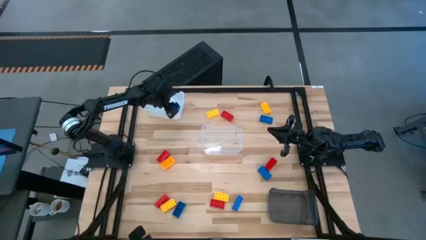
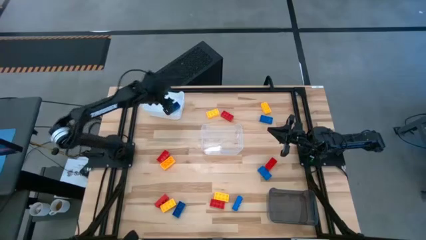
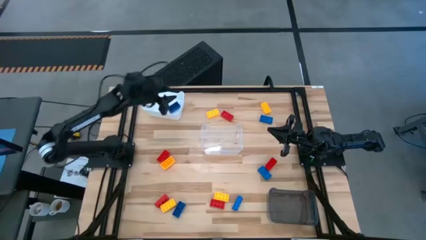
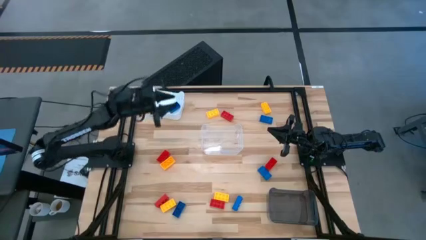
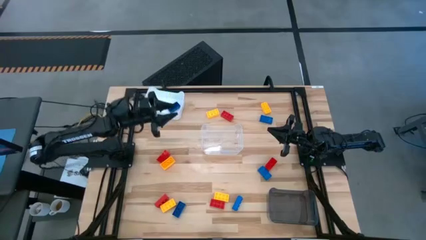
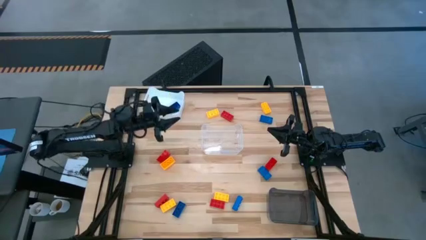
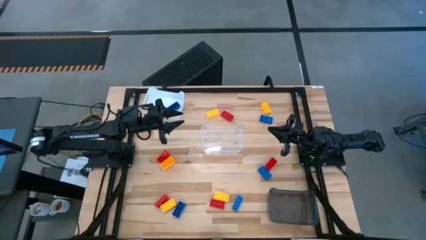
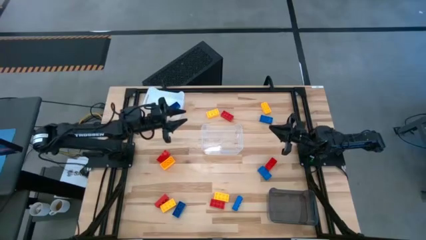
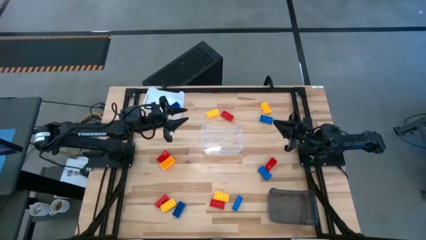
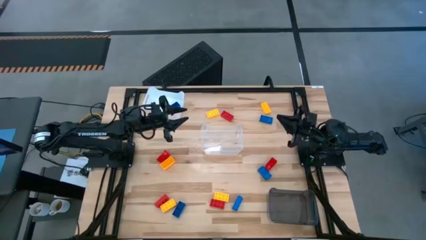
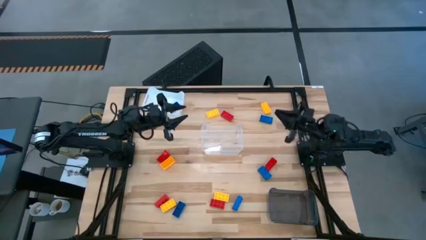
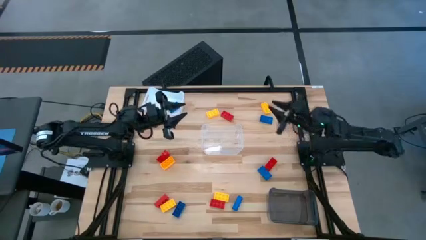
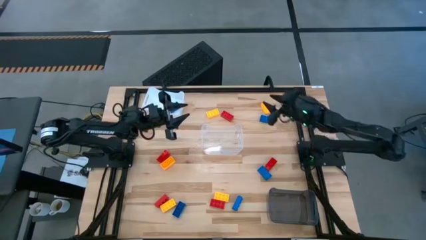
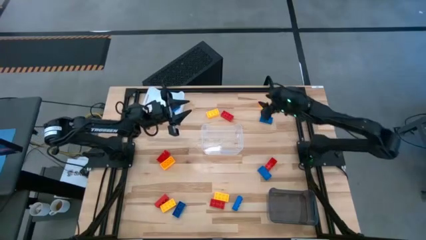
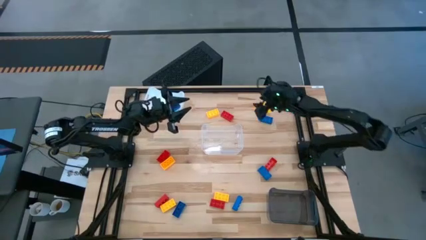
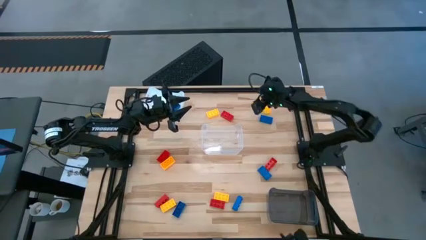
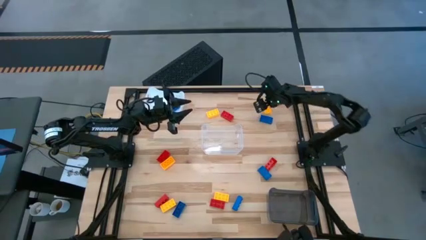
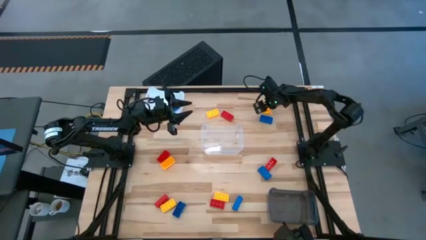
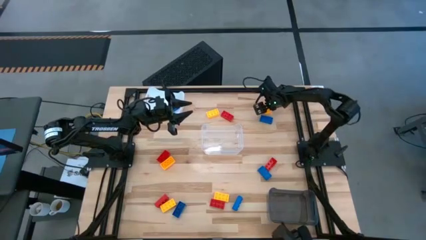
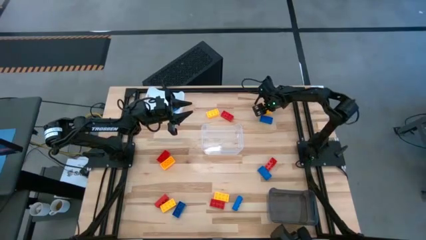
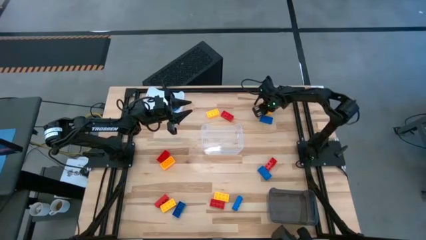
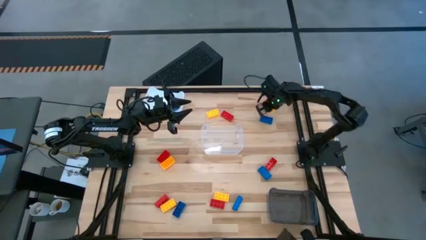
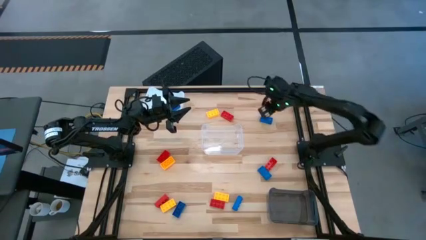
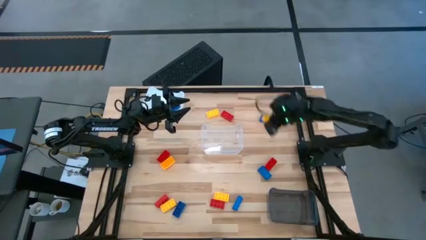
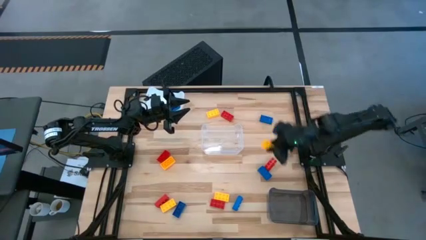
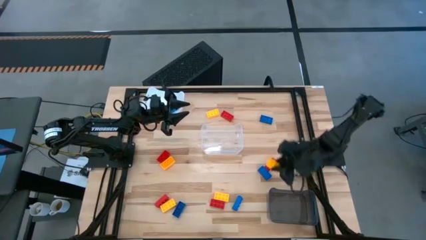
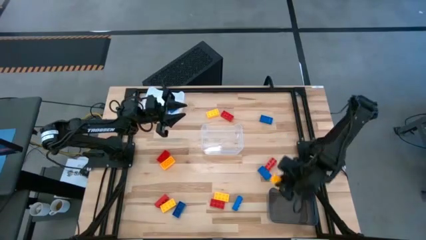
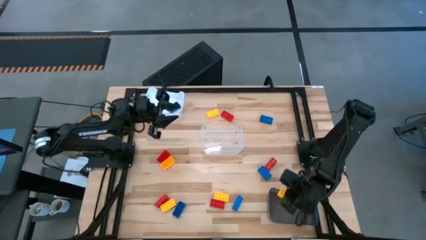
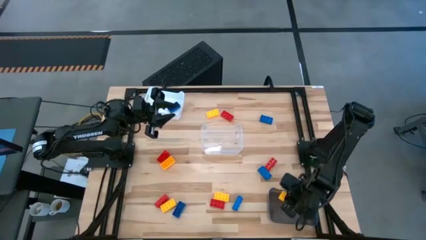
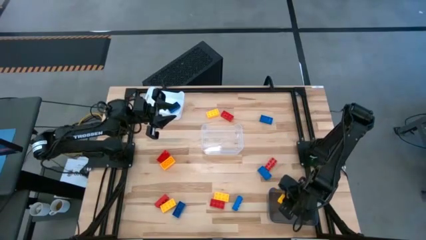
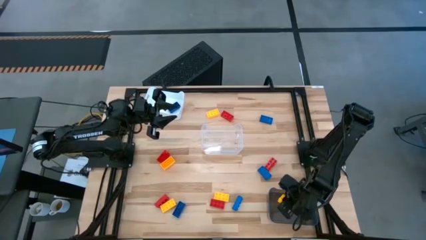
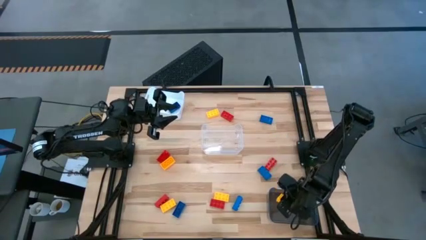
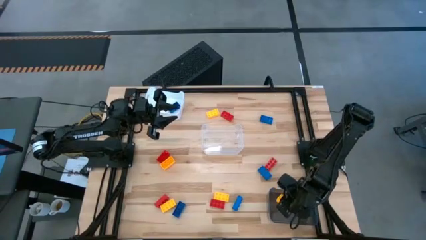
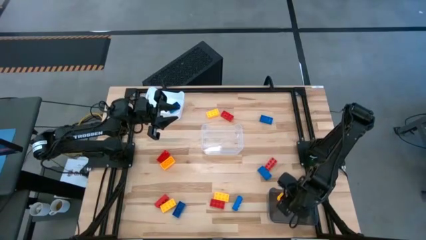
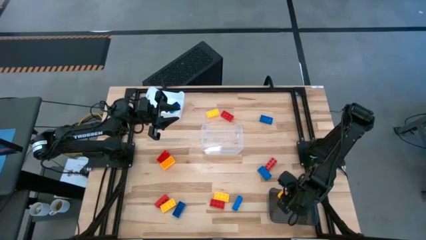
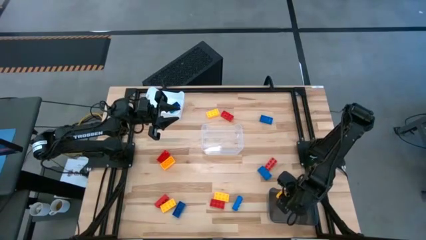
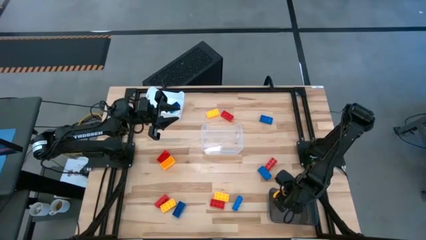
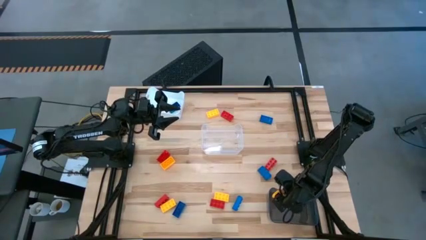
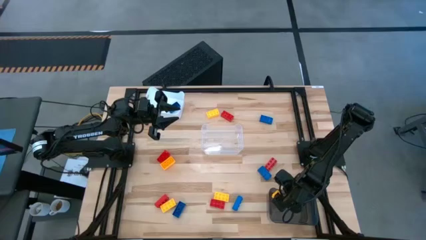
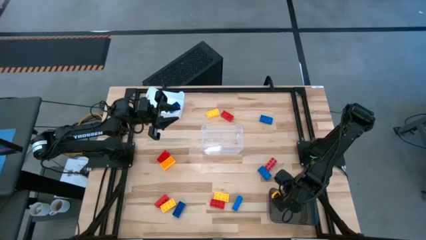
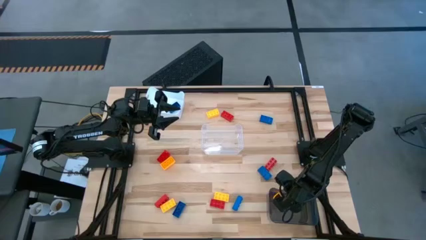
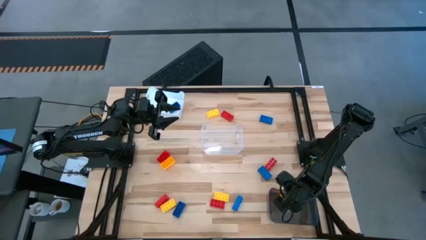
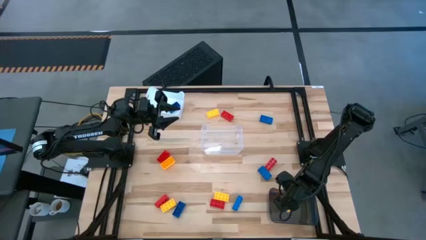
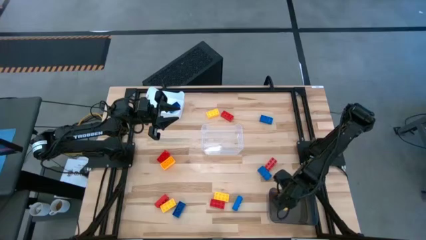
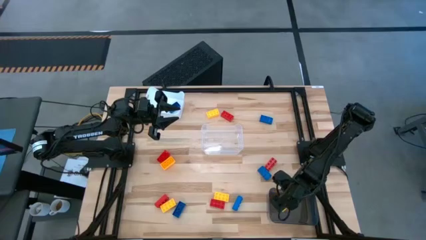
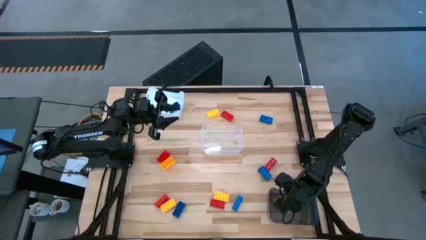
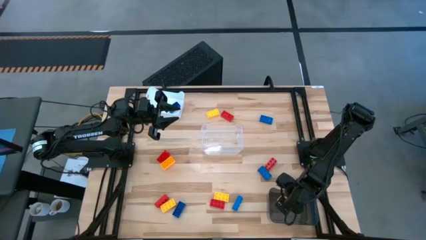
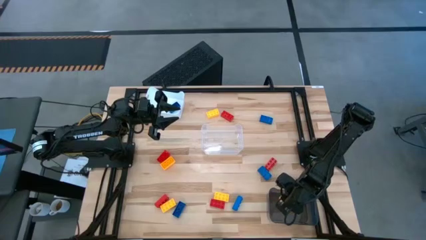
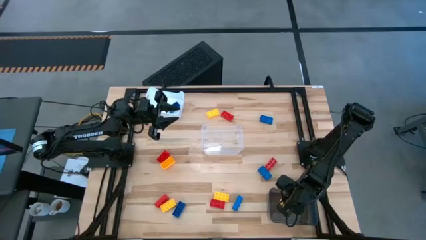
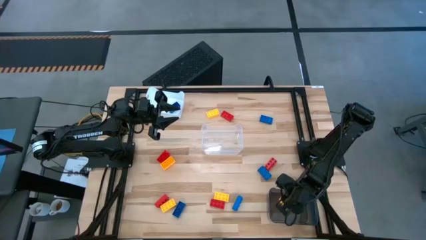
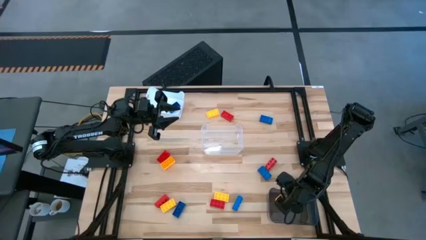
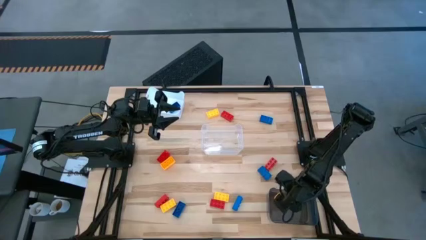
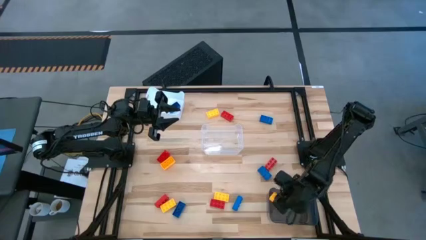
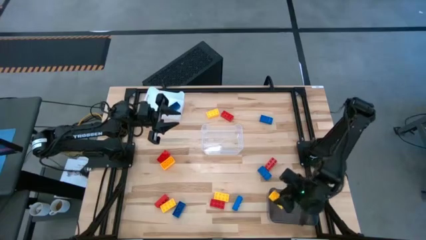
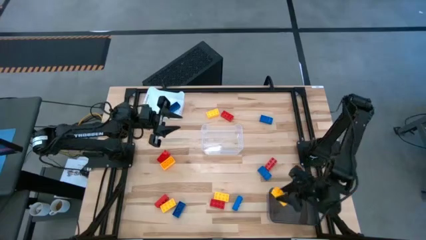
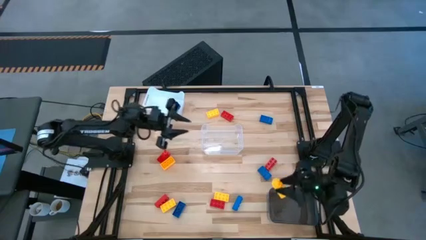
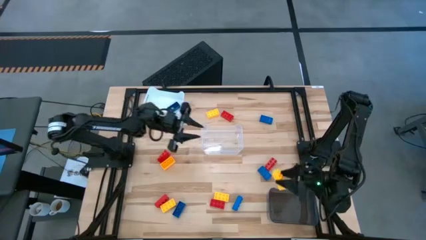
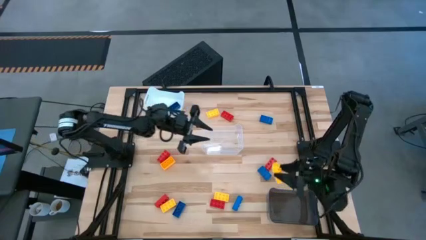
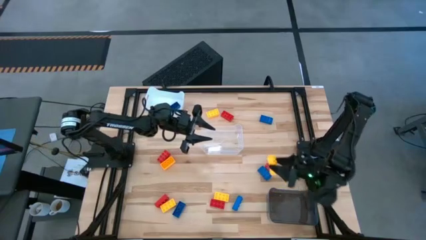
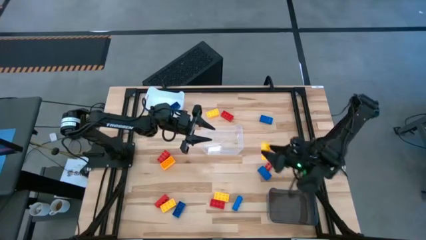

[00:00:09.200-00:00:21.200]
Task: Sort & place blocks by color
Put the yellow game piece into the black bin

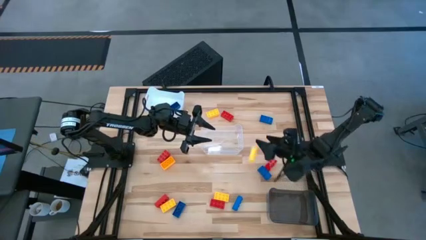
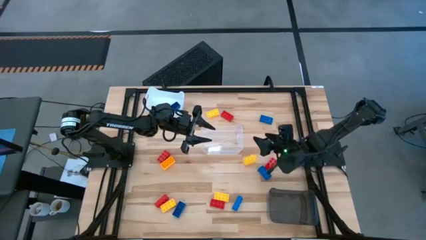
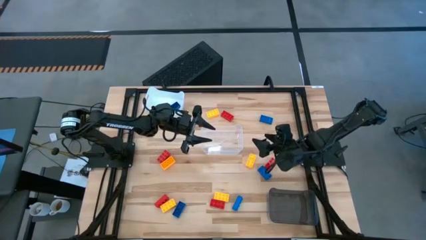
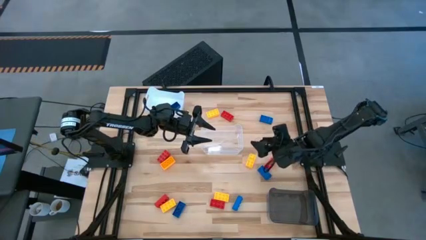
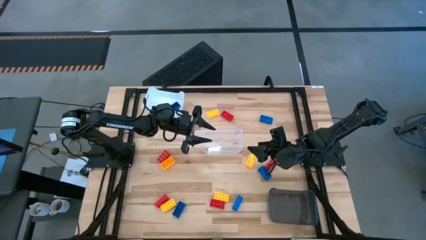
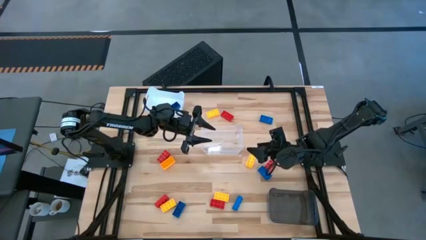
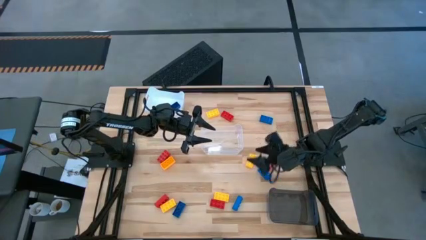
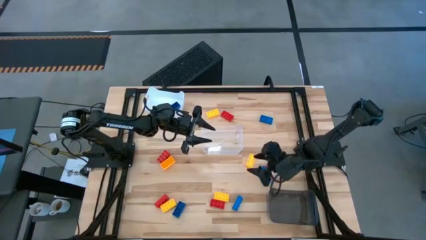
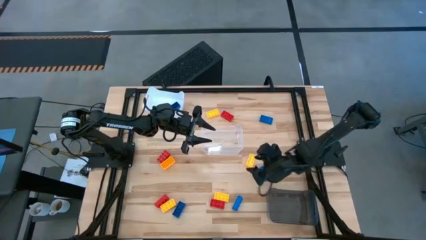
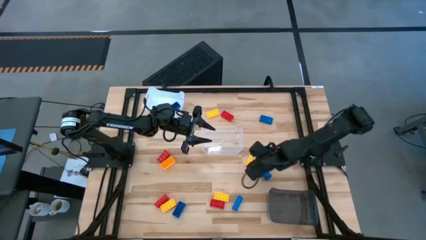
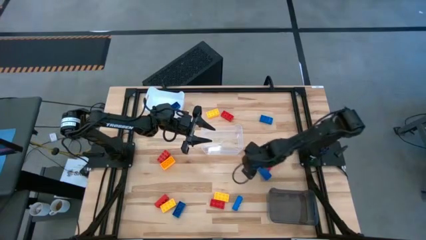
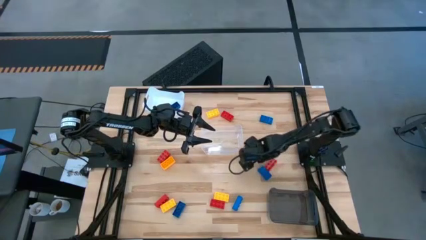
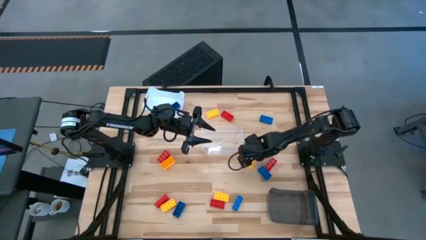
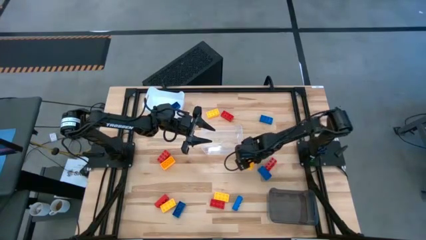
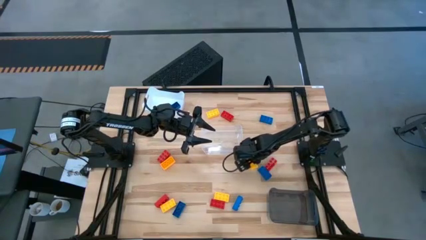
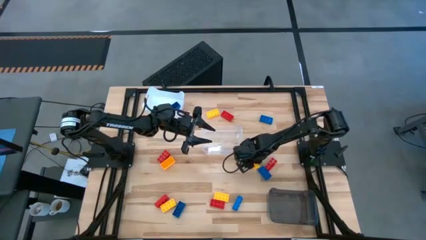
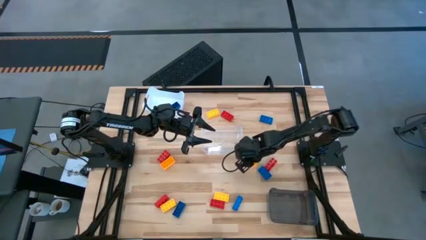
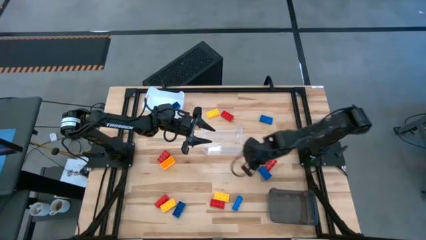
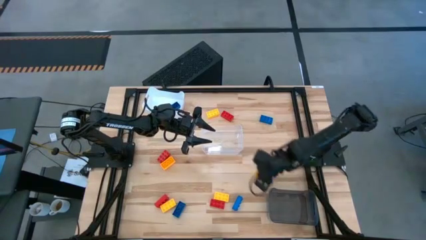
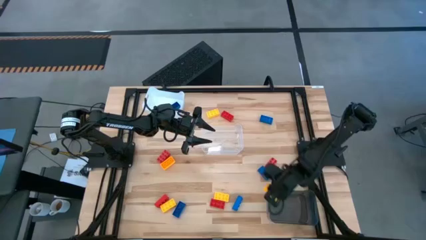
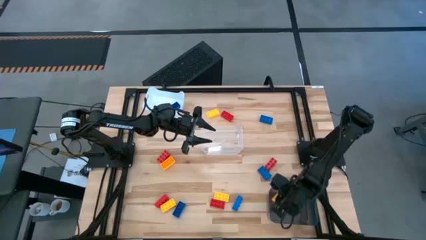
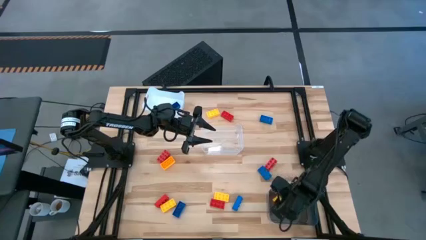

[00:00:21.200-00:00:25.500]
Put the yellow game piece into the black bin
